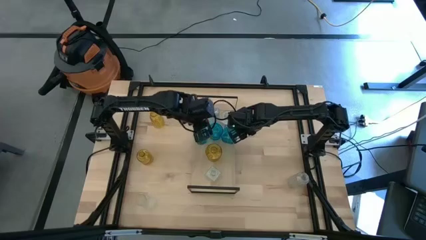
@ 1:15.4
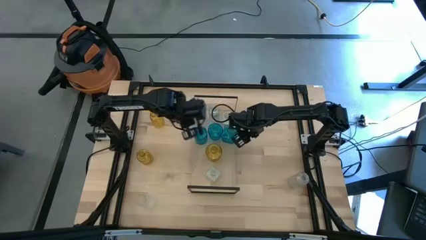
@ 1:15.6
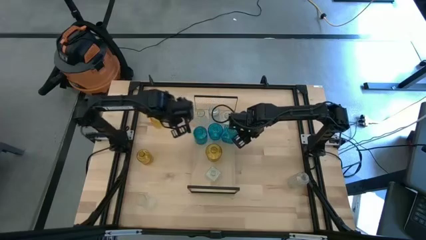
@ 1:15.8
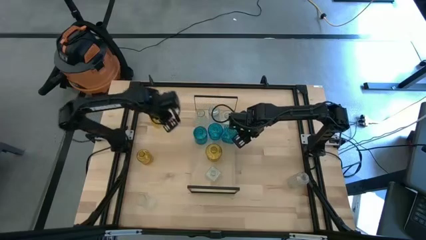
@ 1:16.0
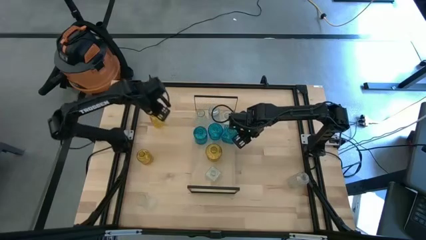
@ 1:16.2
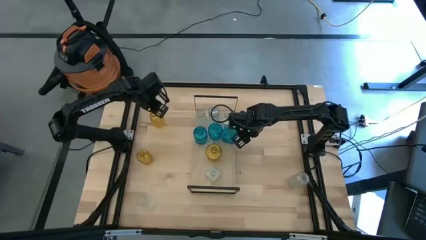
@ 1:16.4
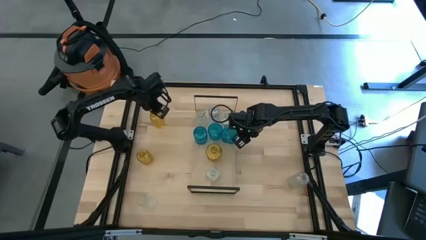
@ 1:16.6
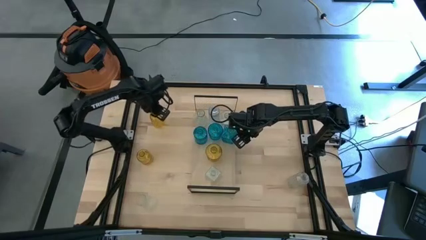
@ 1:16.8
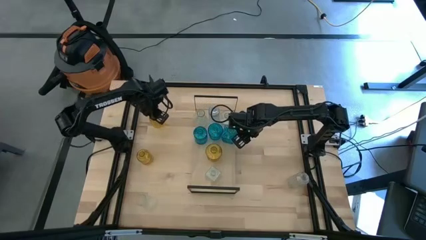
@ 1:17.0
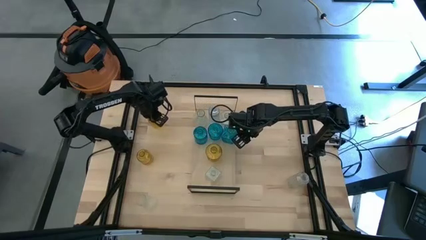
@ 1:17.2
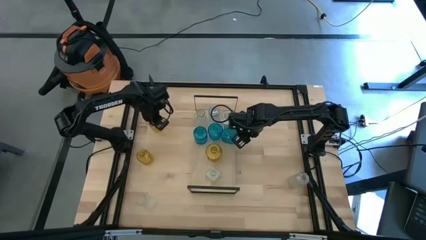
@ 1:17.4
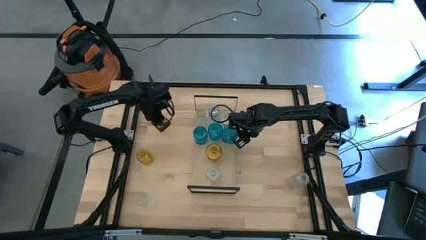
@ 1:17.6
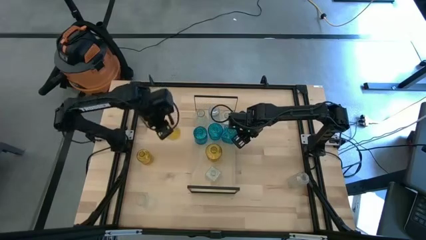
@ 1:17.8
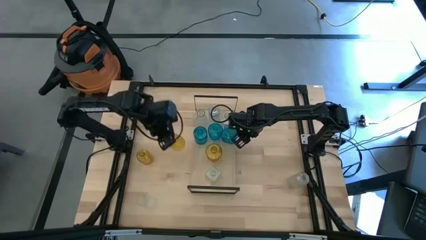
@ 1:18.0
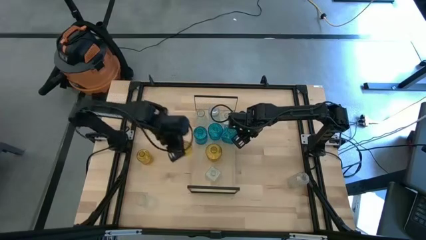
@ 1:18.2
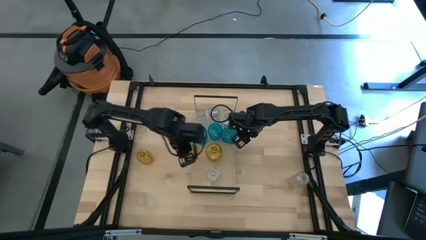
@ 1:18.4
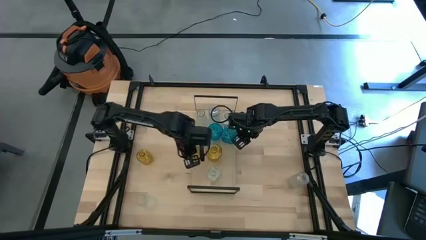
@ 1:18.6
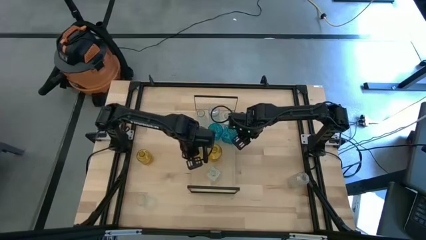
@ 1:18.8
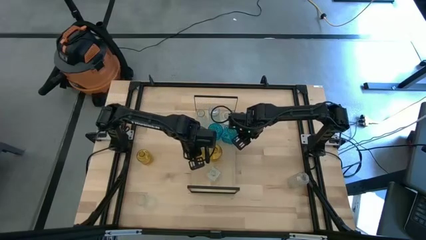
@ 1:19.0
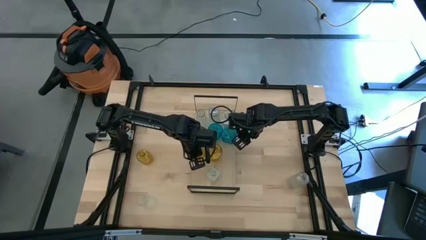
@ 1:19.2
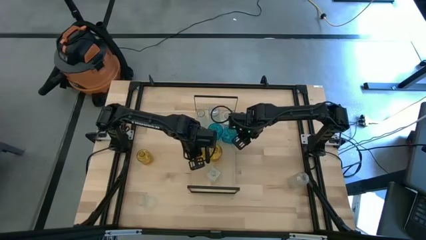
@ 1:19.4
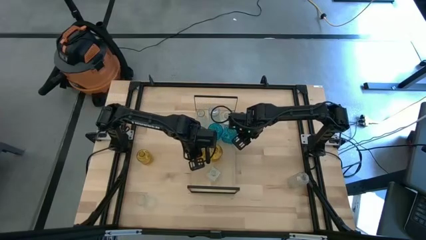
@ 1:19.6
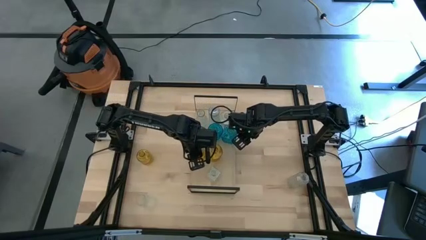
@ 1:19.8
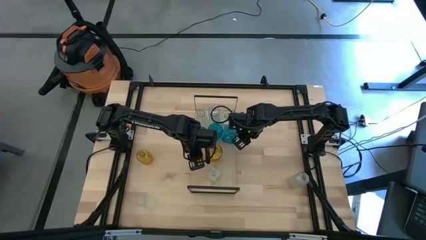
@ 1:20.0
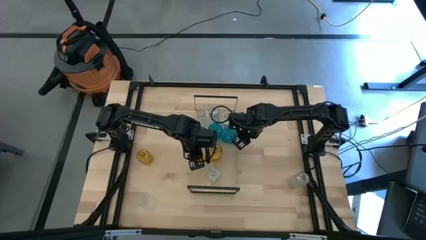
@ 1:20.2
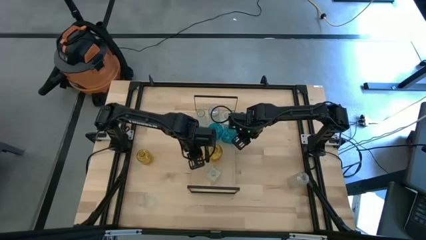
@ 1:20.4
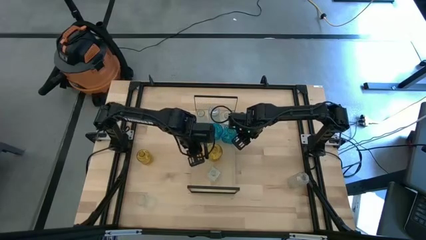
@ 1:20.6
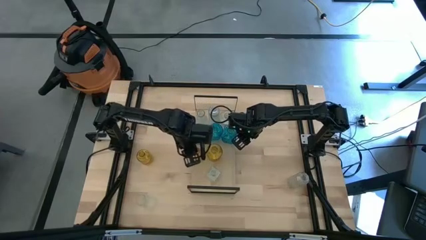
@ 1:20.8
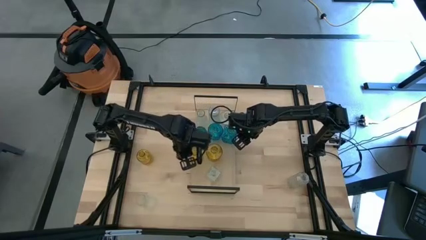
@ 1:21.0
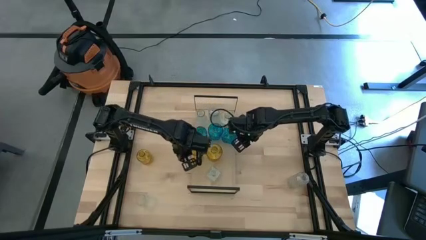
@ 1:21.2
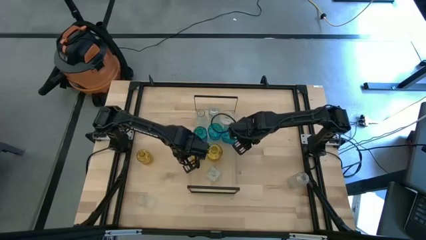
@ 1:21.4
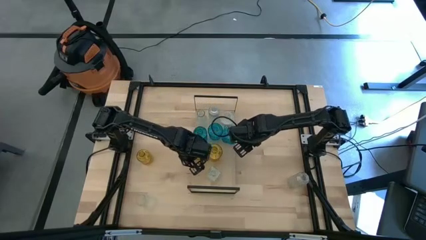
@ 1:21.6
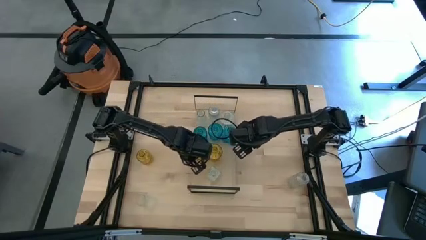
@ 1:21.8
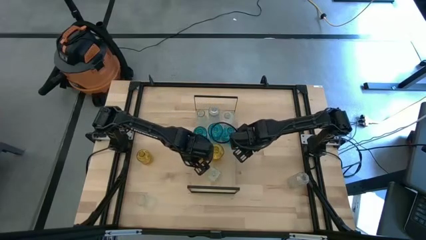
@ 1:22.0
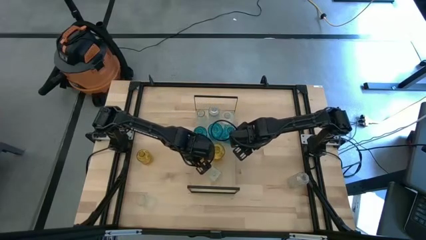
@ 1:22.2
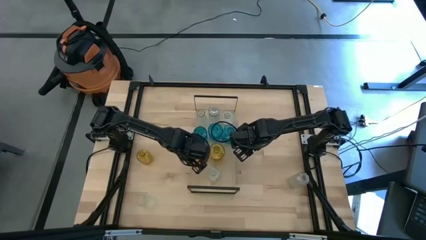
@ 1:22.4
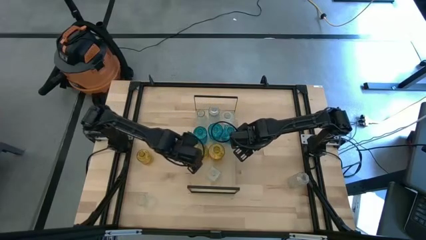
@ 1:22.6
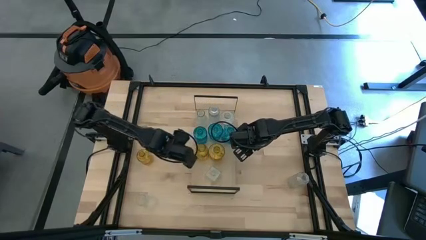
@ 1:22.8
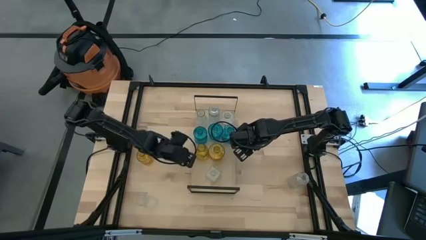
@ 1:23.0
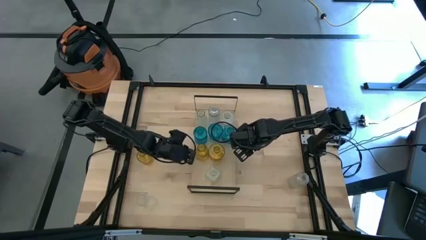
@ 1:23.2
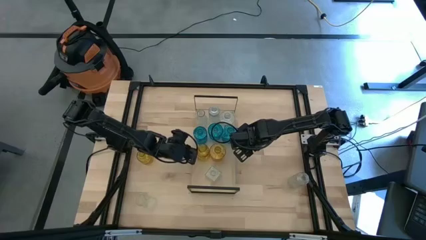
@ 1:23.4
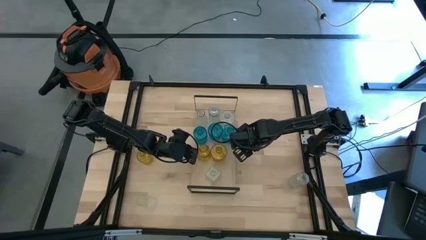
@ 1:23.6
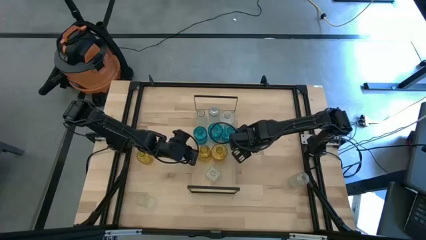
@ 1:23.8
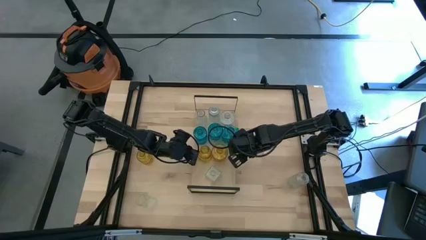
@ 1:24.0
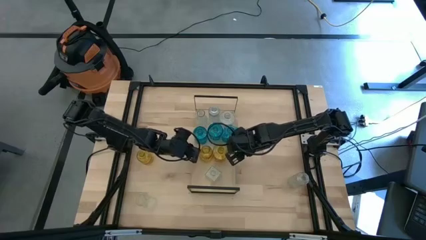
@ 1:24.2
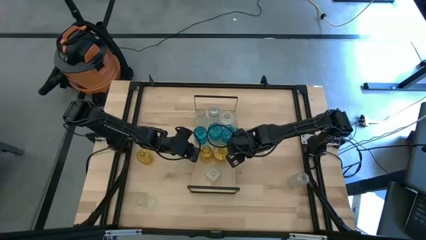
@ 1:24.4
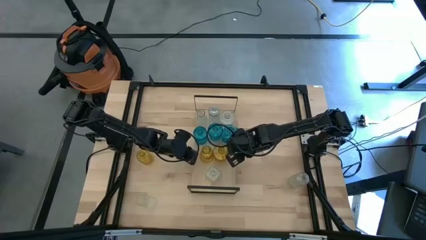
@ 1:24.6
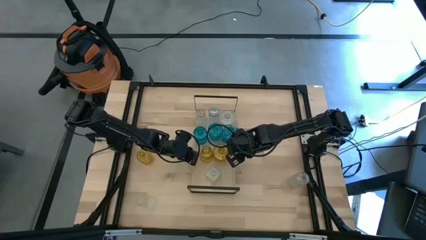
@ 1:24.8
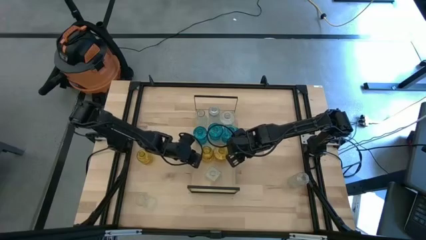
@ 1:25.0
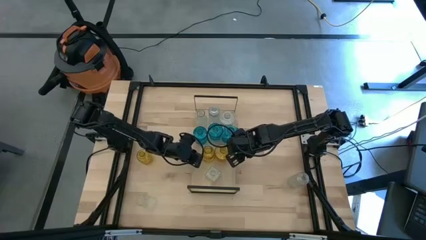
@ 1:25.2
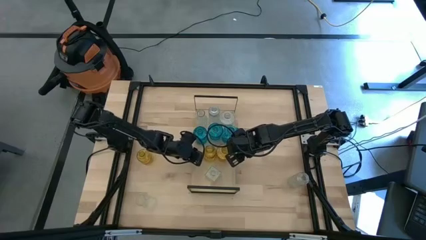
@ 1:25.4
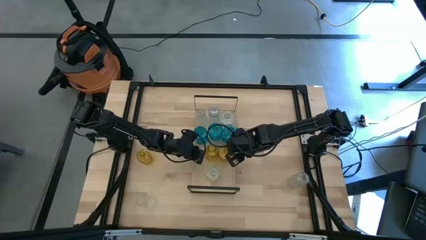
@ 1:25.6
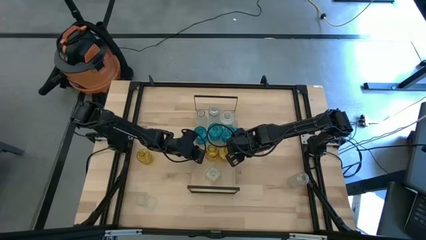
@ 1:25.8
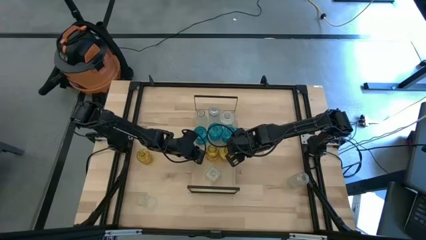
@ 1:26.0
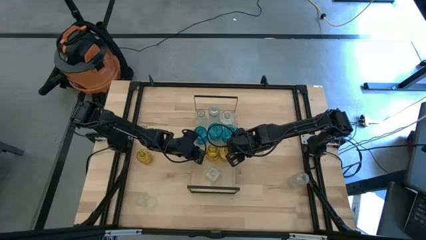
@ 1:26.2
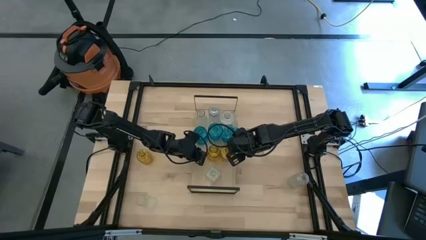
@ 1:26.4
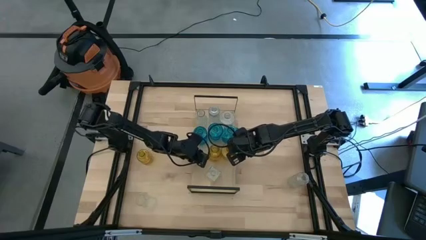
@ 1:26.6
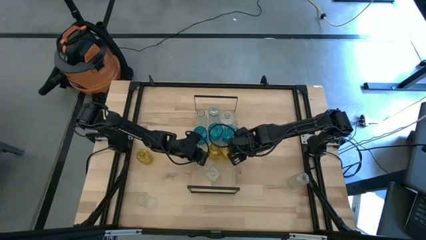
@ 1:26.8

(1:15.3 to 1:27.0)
Task: sort vases onto shelf
Put the yellow vase on the shelf aligned with the other yellow vase

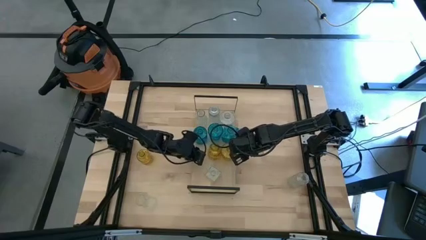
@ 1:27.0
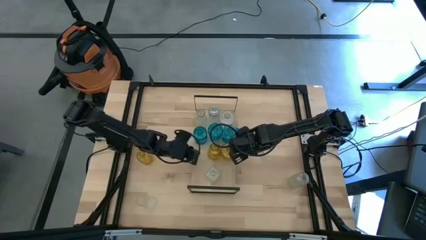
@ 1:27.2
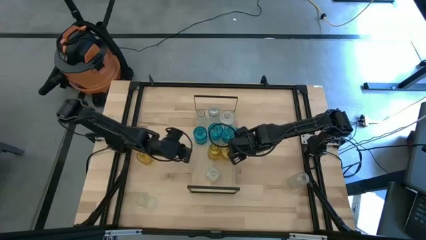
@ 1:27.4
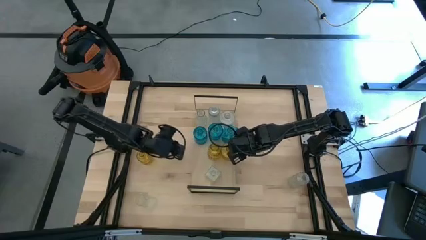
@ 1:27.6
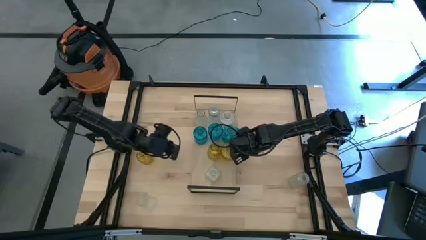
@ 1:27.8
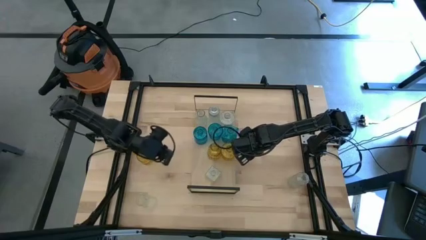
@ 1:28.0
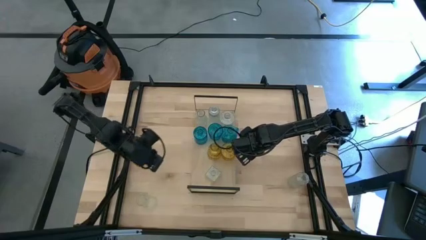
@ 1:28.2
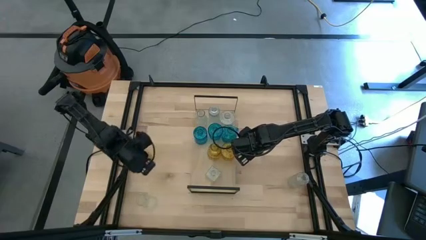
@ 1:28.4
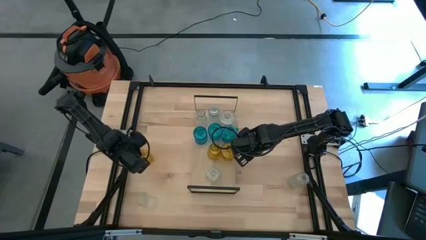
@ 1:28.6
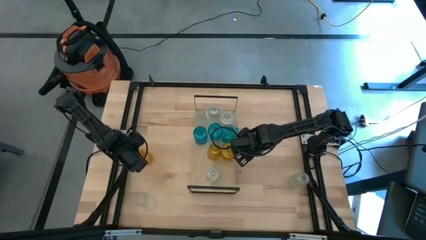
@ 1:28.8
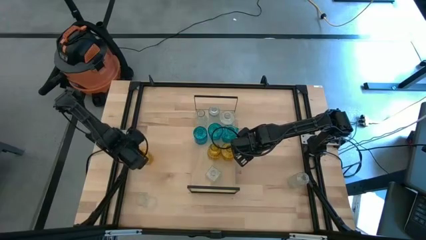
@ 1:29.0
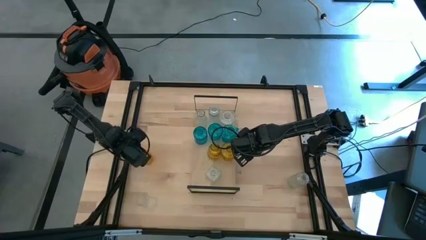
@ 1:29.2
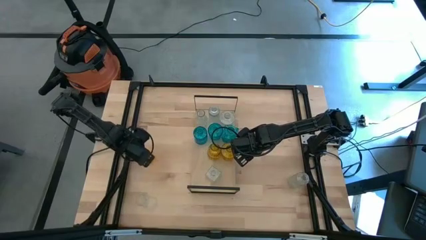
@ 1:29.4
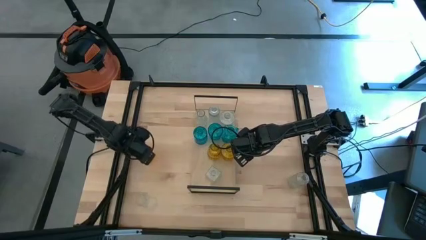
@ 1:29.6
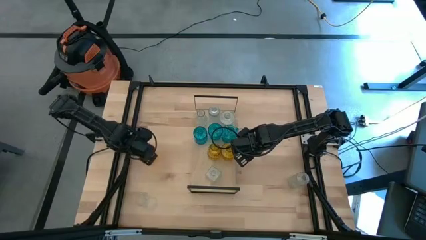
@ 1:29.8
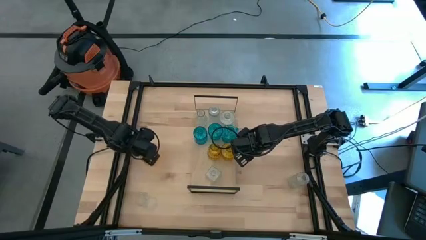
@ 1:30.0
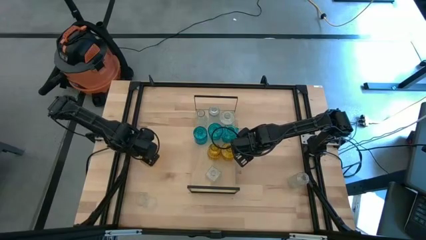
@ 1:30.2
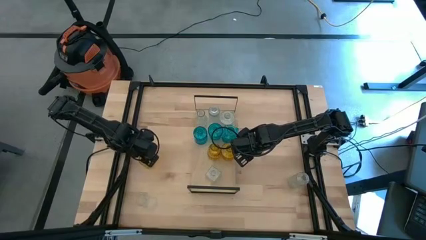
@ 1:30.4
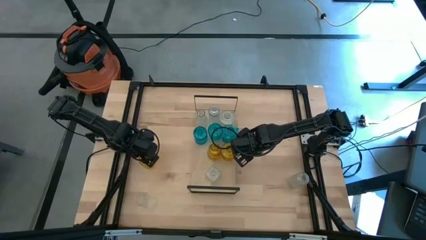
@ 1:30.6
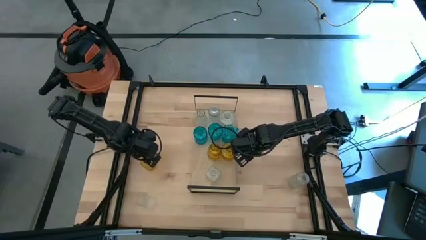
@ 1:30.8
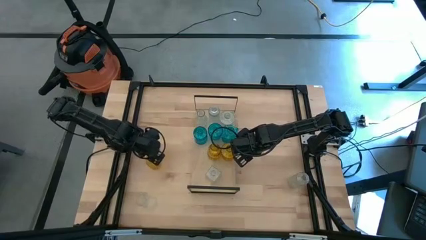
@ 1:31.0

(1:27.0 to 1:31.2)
Put the yellow vase on the shelf aligned with the other yellow vase
